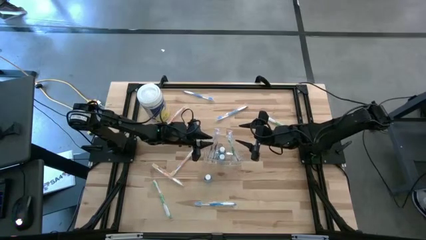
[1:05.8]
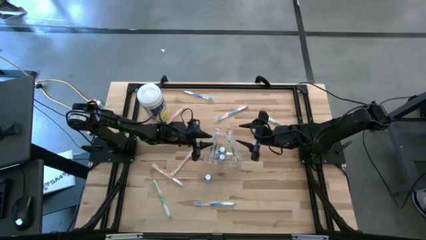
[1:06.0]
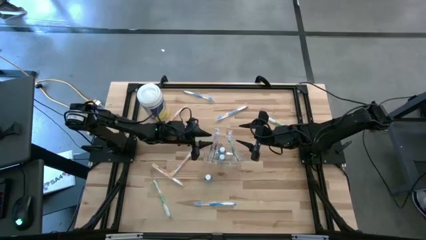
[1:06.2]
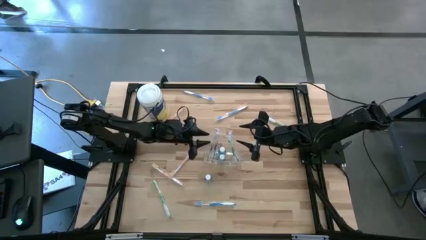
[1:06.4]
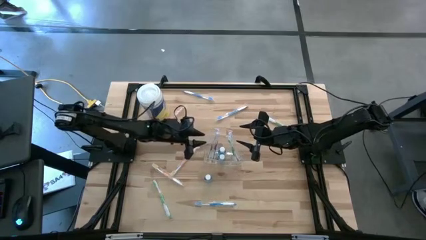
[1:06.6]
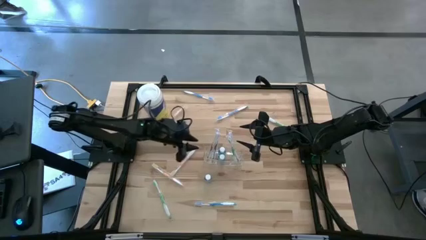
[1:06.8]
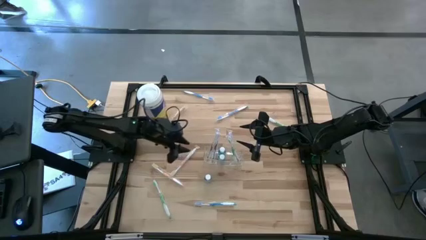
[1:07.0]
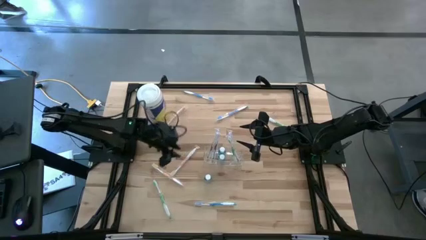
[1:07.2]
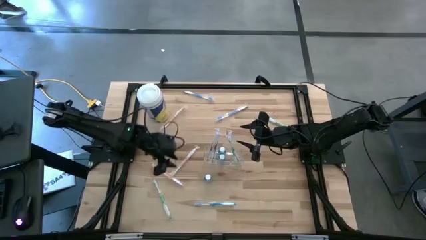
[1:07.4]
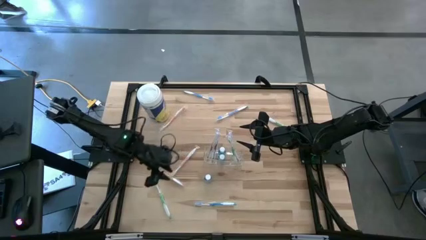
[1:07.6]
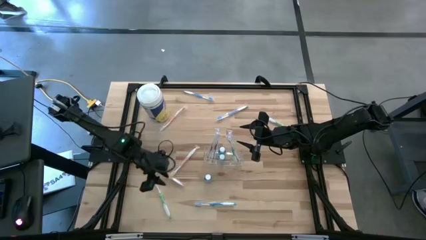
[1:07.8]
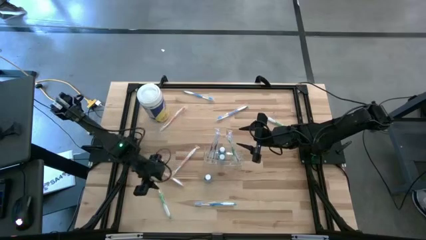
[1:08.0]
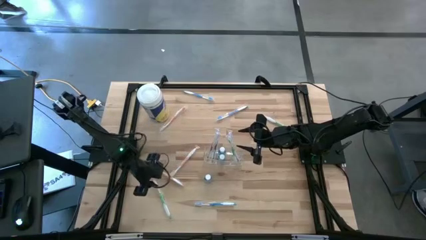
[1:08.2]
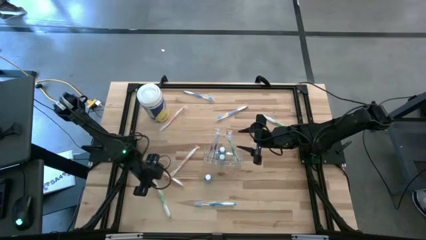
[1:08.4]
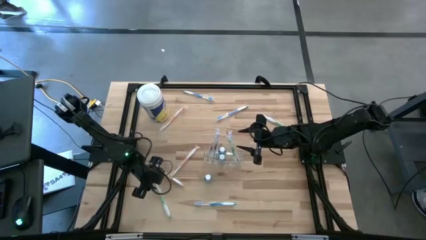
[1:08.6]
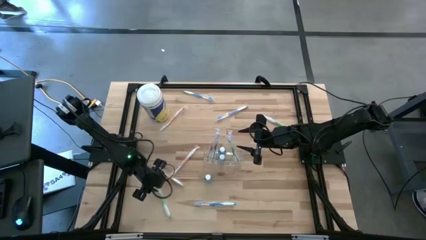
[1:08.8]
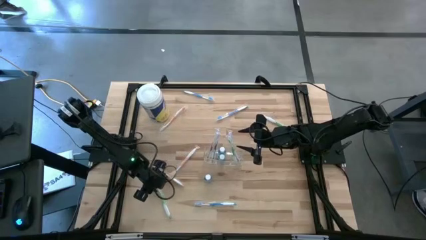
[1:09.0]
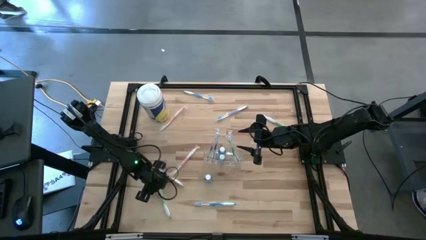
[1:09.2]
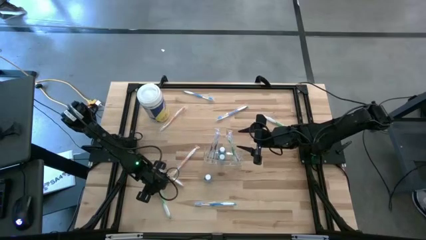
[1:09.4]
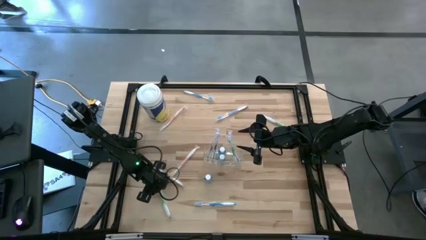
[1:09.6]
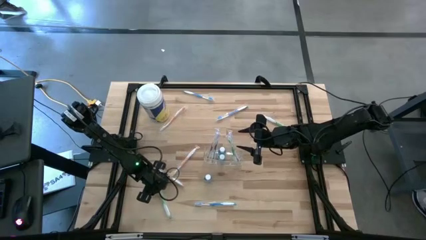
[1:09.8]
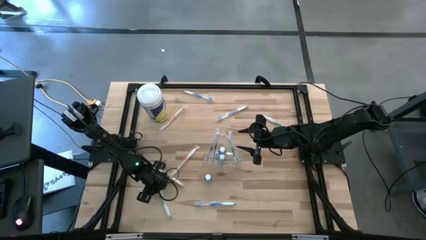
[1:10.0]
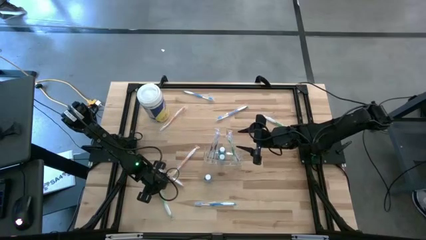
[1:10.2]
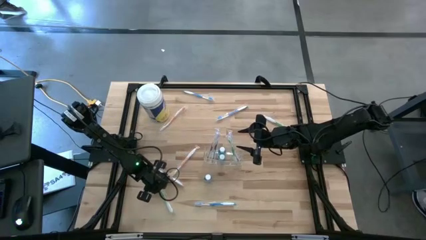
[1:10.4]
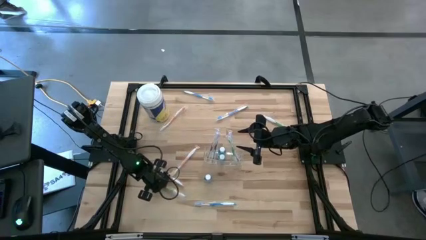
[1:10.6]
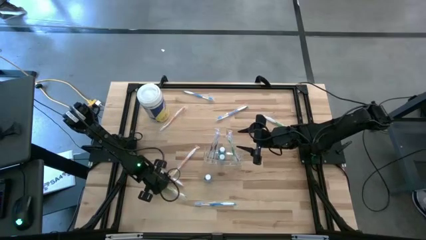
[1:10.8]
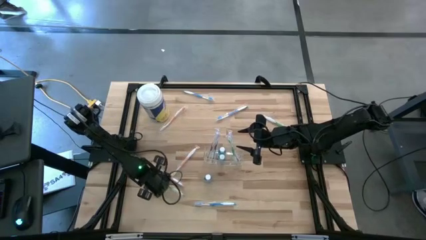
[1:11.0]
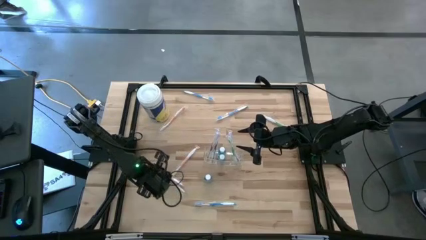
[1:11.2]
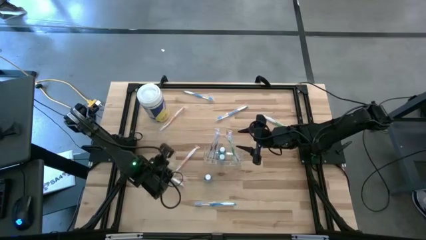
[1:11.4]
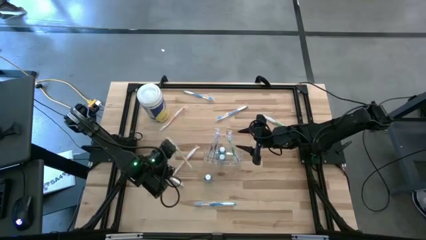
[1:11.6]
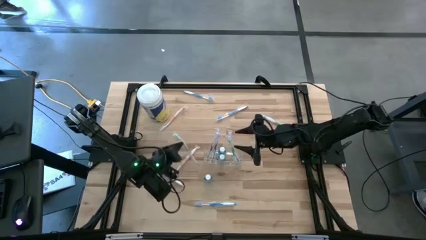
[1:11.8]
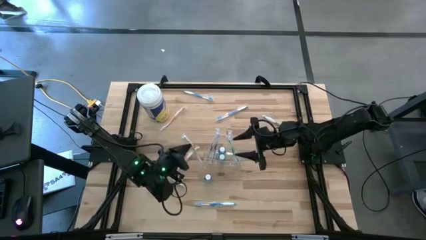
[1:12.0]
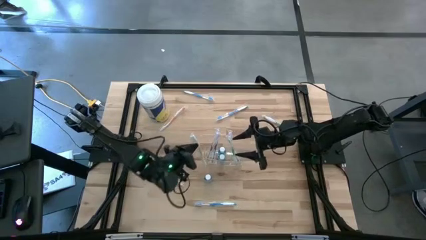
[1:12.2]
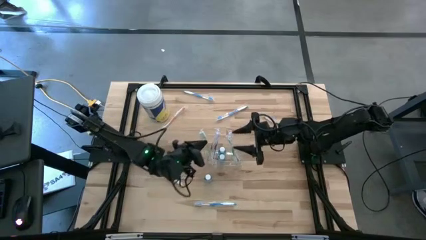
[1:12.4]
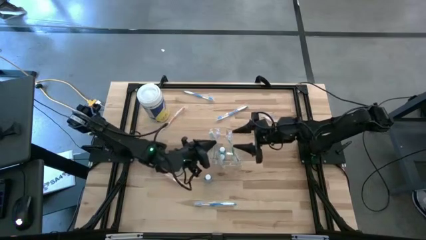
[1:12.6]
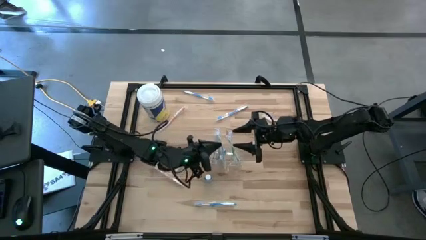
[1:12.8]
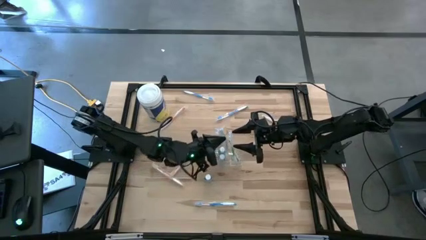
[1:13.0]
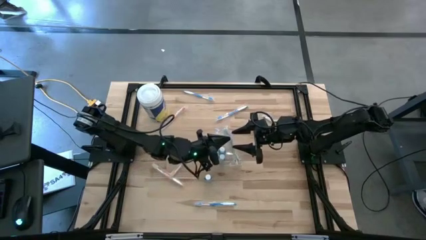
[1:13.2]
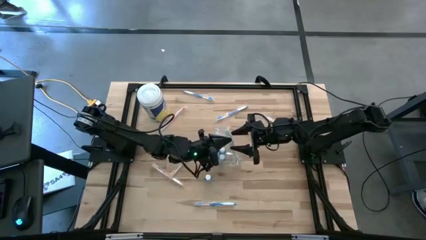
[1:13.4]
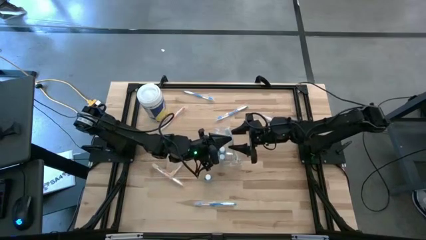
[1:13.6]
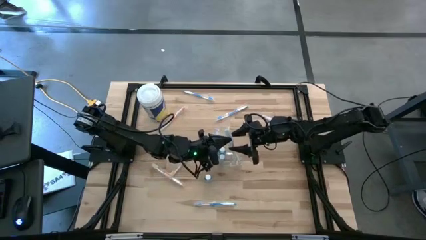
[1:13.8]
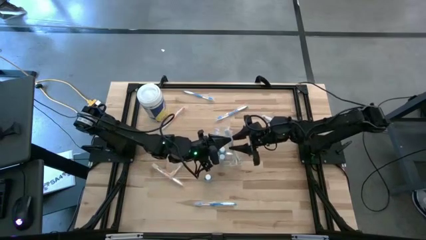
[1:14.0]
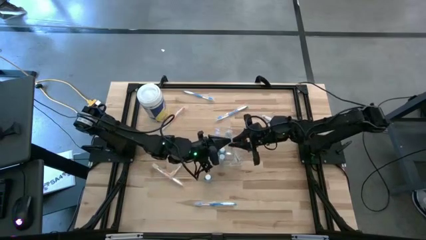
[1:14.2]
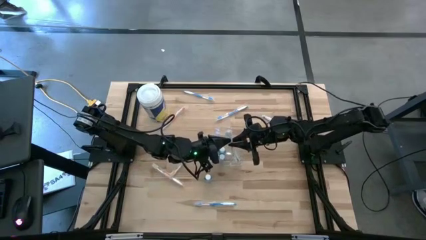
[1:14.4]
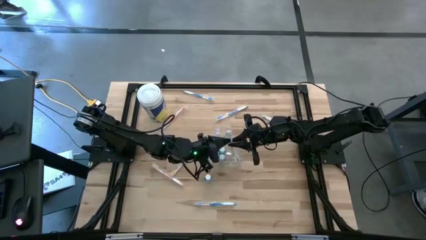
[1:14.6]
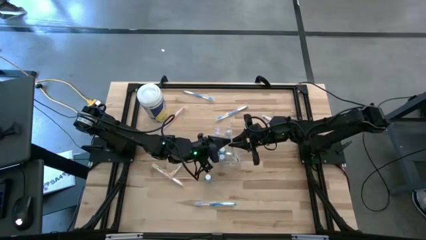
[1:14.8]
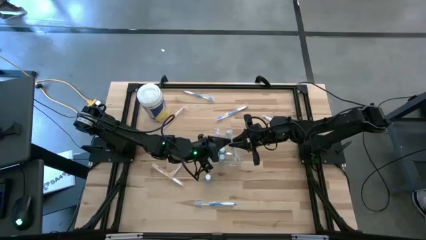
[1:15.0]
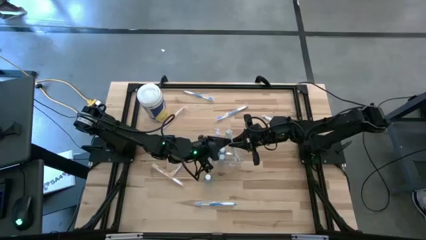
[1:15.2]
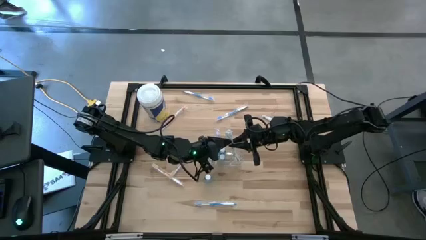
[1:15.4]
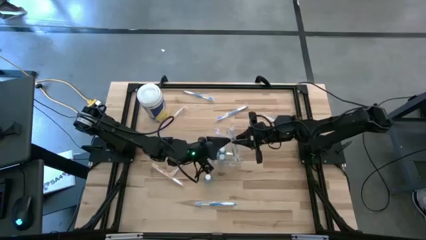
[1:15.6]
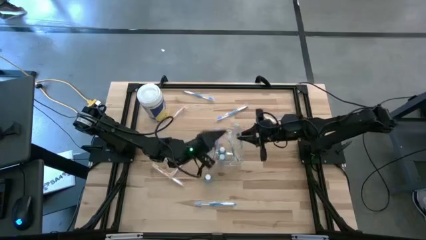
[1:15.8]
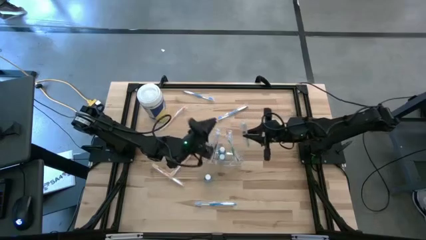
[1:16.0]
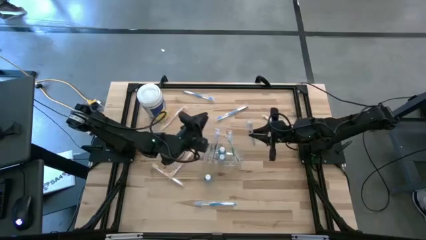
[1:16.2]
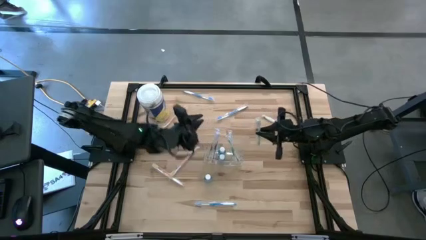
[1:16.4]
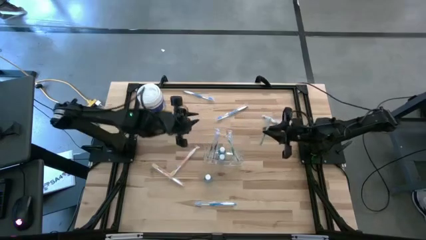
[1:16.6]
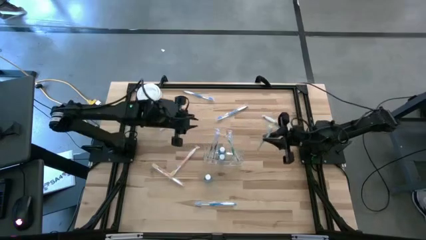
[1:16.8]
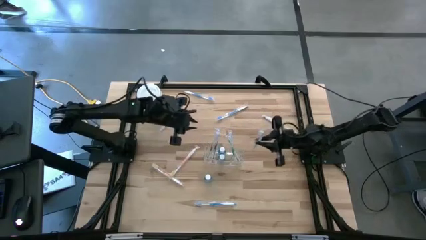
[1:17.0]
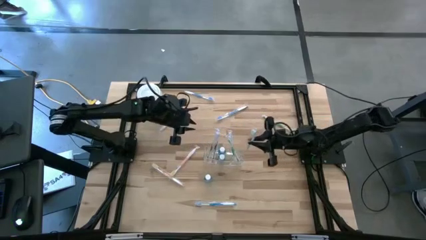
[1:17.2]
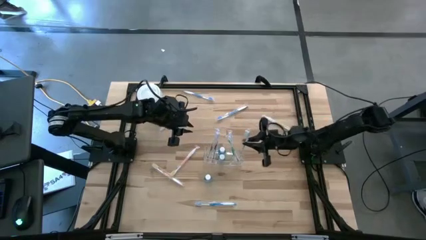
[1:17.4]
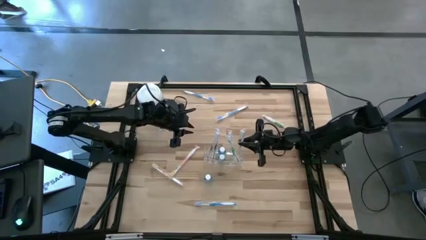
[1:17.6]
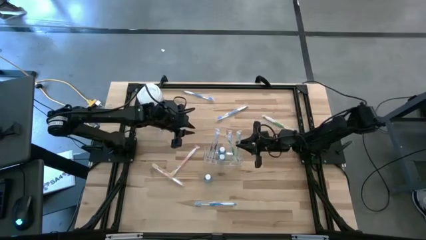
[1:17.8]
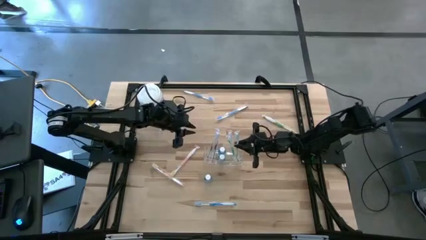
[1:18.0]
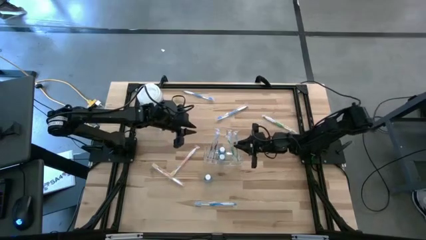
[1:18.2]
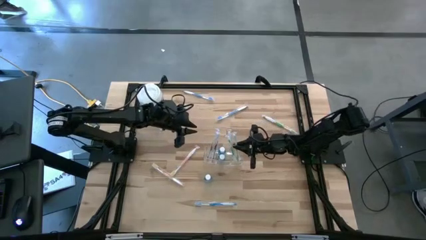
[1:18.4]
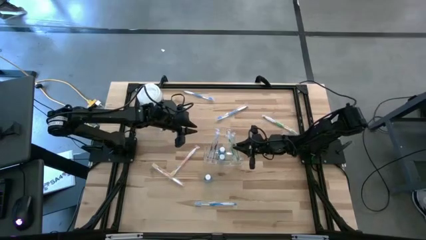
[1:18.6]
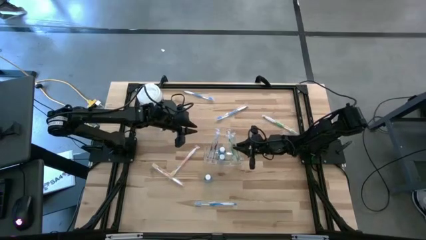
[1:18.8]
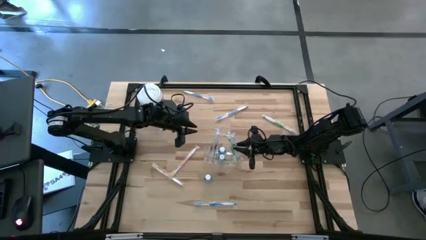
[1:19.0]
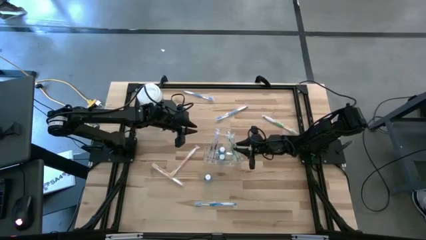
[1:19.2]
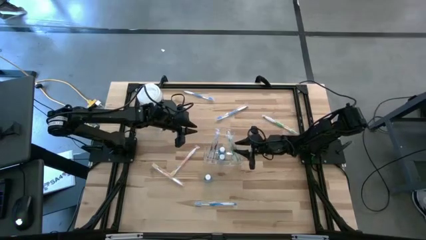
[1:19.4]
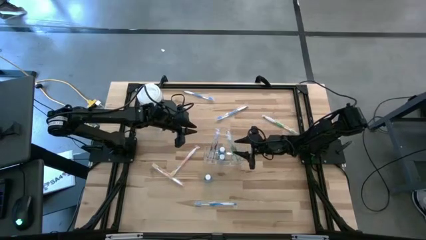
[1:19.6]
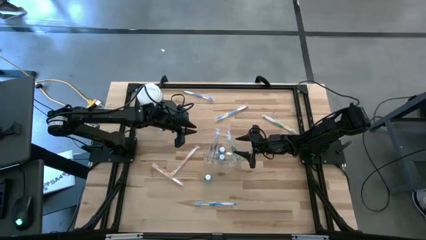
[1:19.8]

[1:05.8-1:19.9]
Task: Pick & Place toothbrushing station
Put the bottom green toothbrush into the transparent organizer

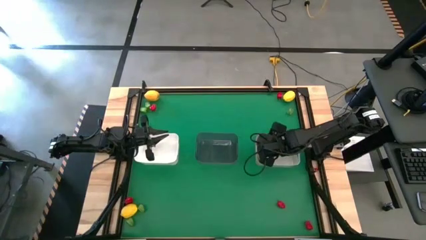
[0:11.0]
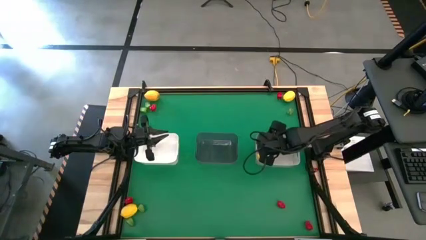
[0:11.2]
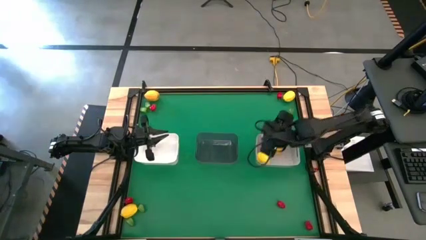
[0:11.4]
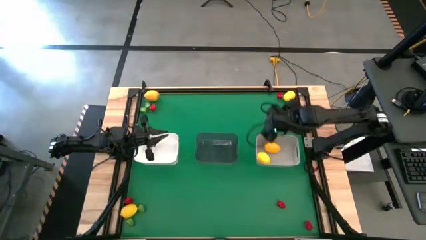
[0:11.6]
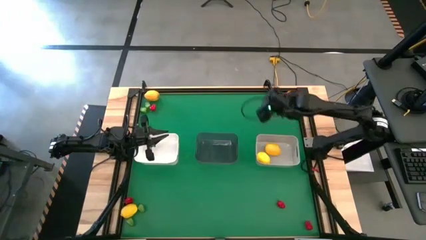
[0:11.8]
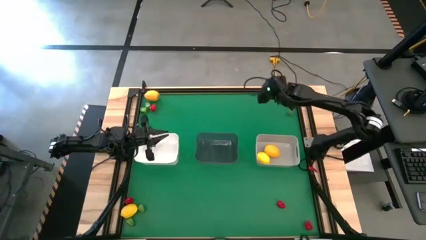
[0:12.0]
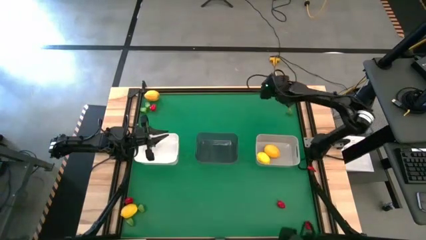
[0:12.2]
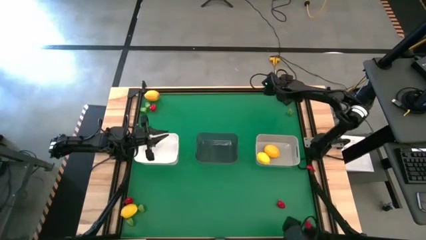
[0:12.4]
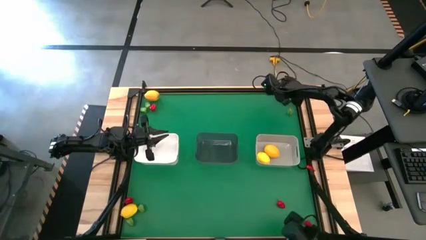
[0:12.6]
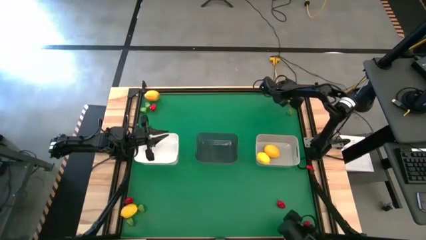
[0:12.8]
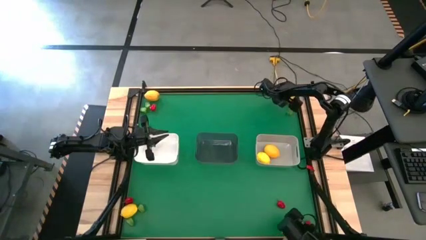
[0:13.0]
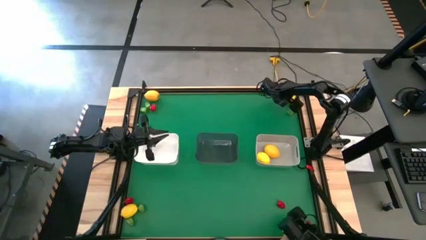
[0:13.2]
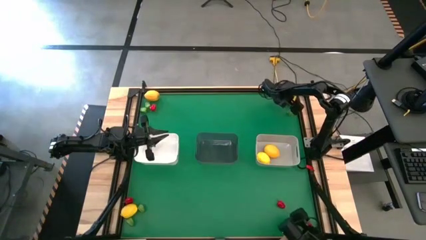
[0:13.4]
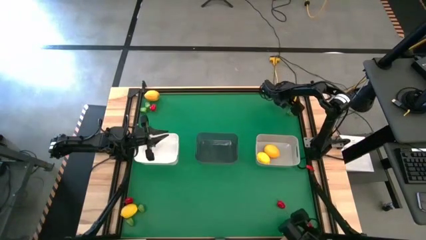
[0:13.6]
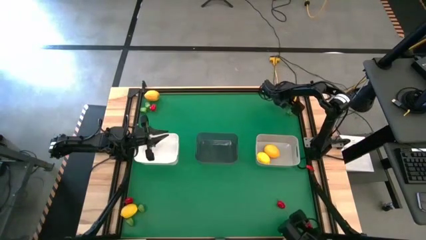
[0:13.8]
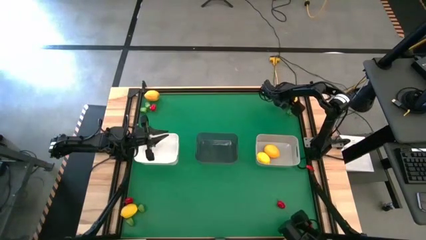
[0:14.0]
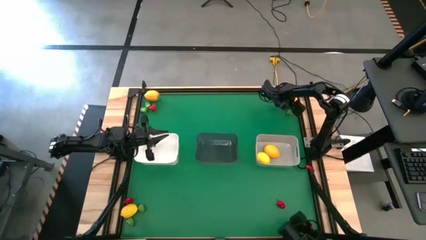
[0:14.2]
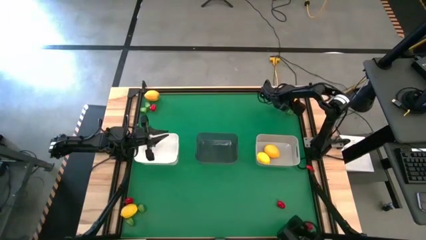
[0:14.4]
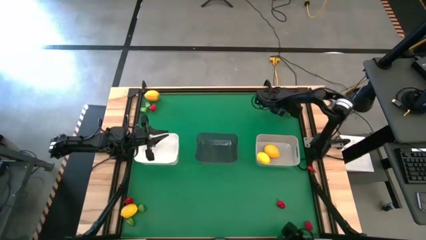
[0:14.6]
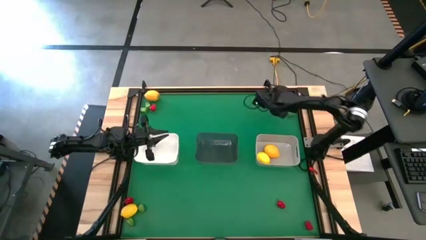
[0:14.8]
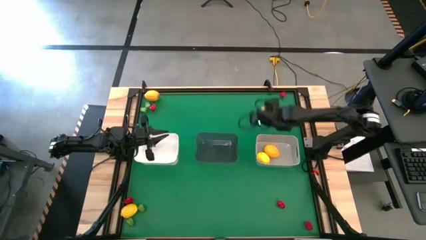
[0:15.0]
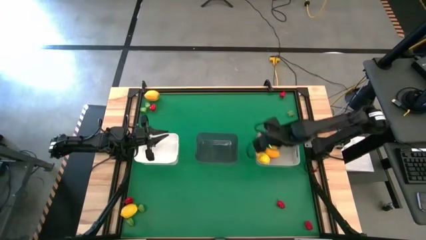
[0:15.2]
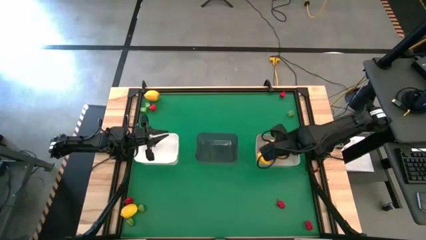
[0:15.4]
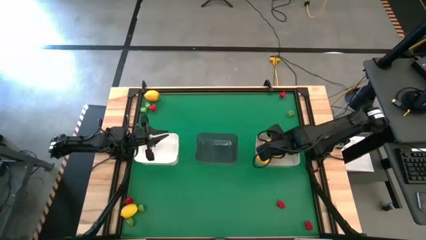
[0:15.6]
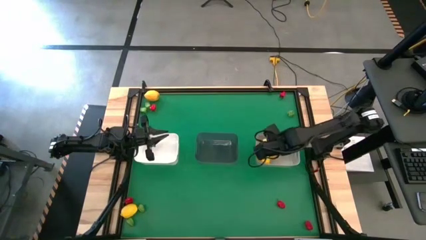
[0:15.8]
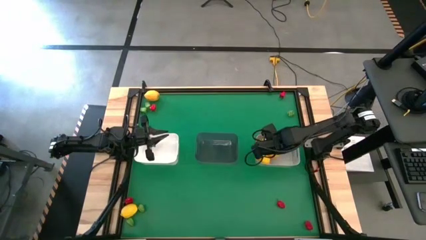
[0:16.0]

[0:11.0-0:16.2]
Task: Sort produce into baskets
Put the yellow lemon into the gray bin
